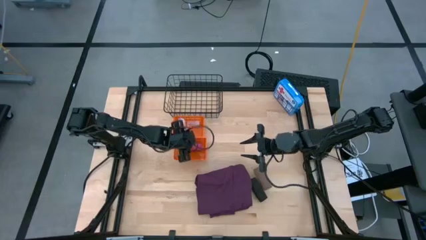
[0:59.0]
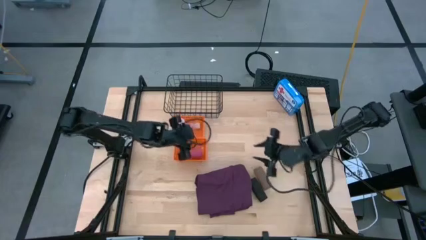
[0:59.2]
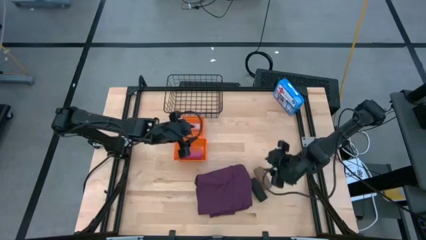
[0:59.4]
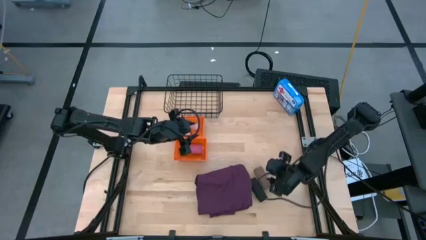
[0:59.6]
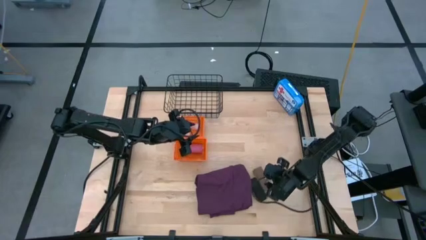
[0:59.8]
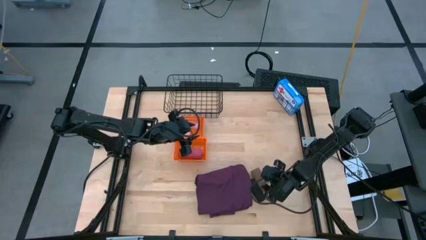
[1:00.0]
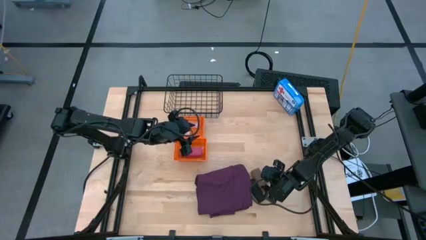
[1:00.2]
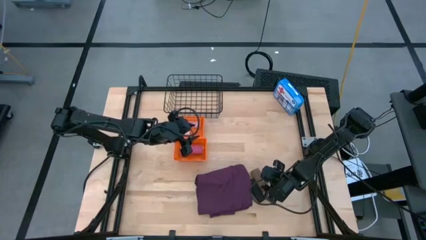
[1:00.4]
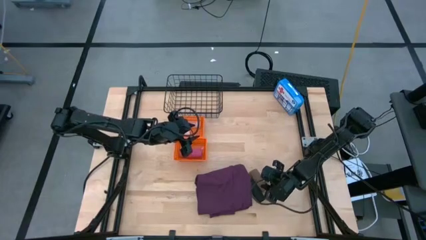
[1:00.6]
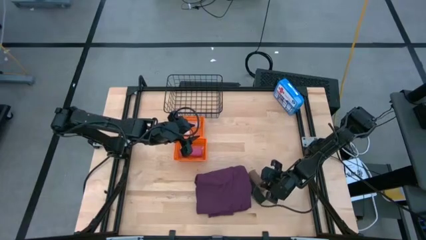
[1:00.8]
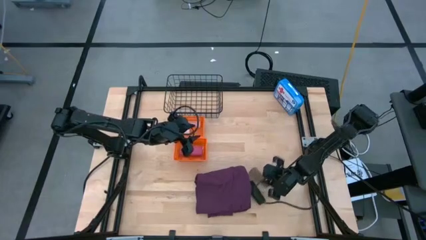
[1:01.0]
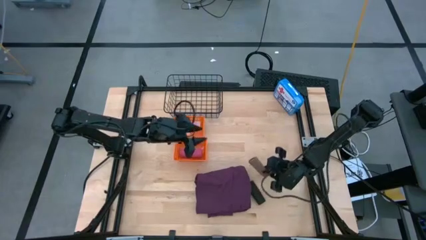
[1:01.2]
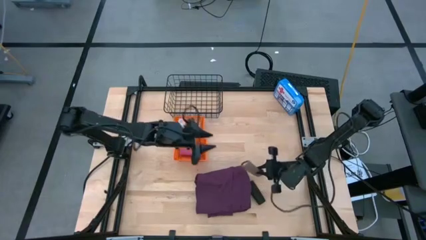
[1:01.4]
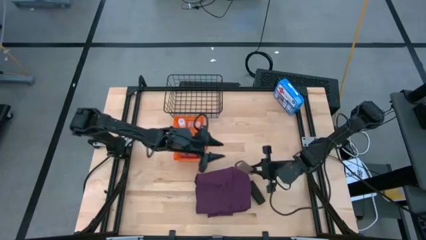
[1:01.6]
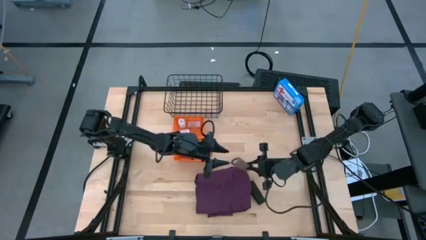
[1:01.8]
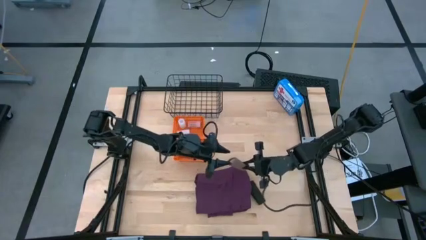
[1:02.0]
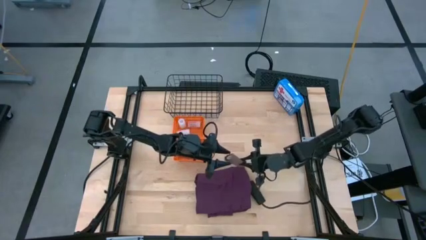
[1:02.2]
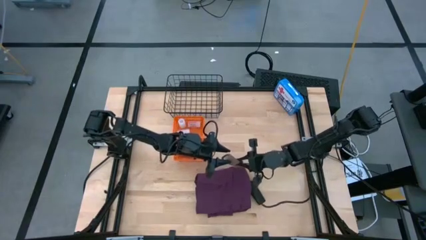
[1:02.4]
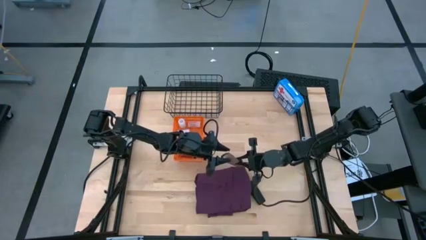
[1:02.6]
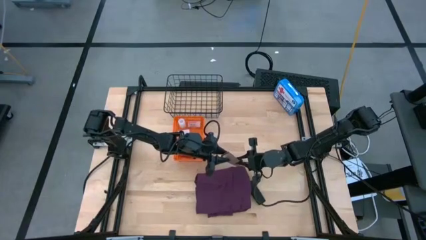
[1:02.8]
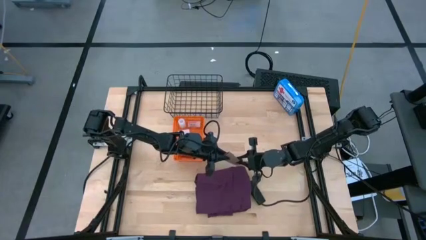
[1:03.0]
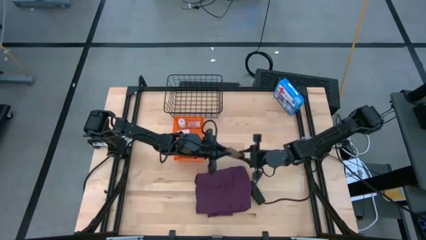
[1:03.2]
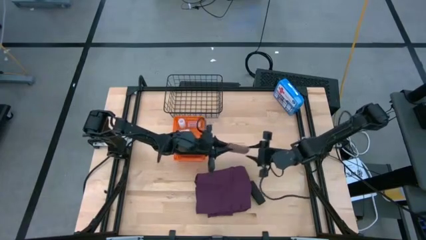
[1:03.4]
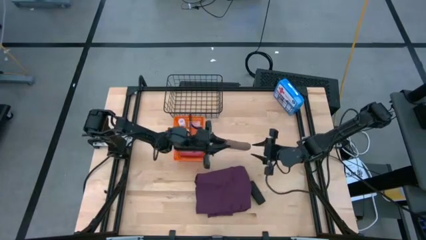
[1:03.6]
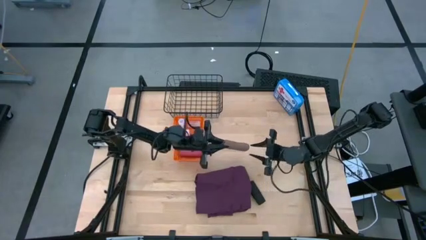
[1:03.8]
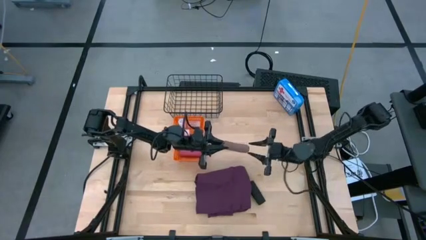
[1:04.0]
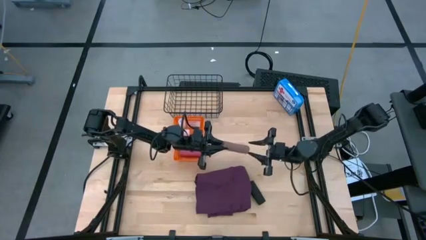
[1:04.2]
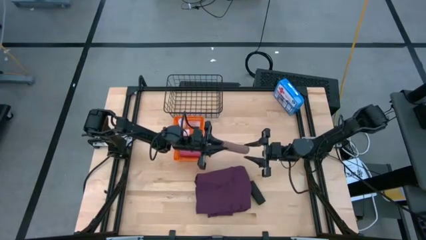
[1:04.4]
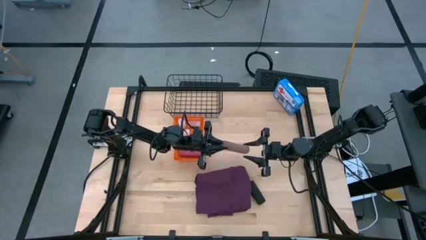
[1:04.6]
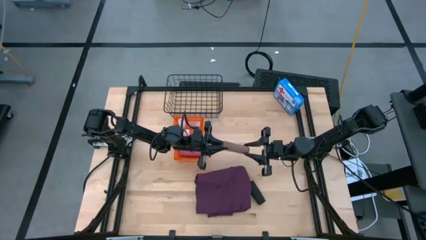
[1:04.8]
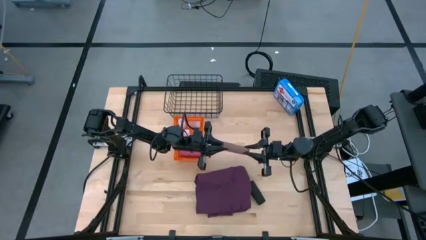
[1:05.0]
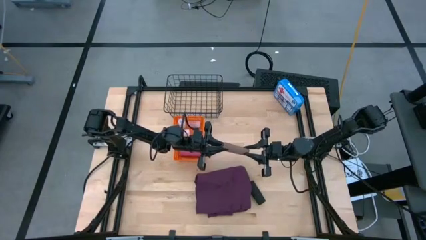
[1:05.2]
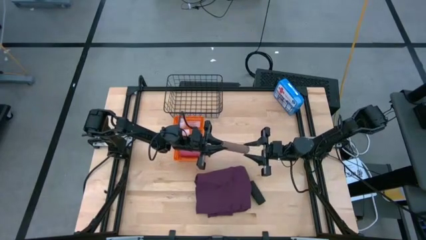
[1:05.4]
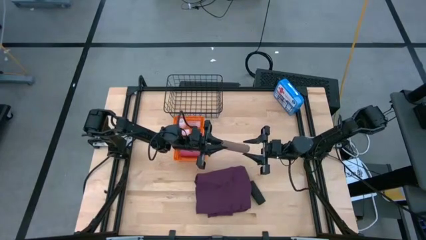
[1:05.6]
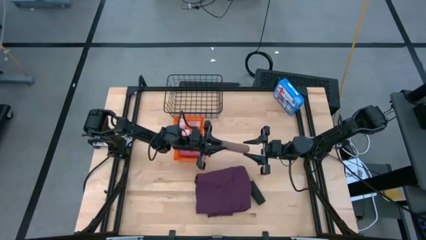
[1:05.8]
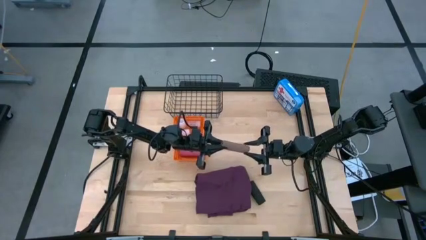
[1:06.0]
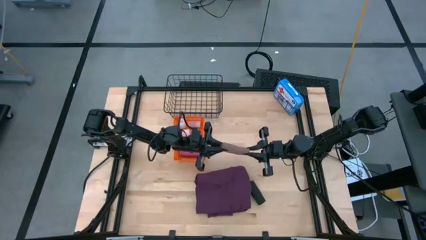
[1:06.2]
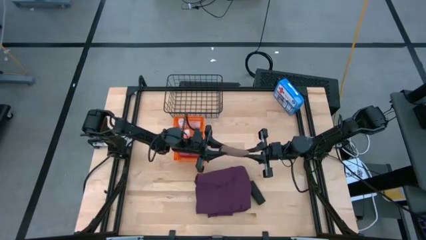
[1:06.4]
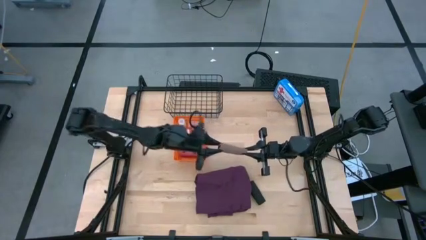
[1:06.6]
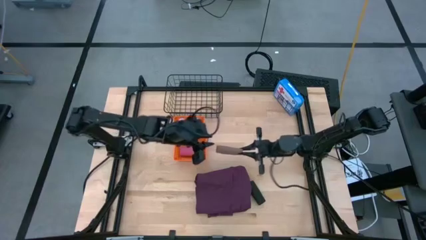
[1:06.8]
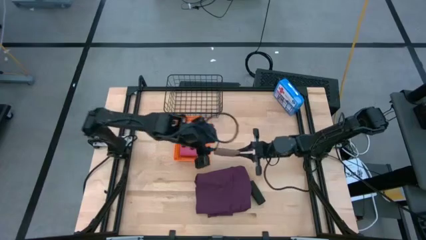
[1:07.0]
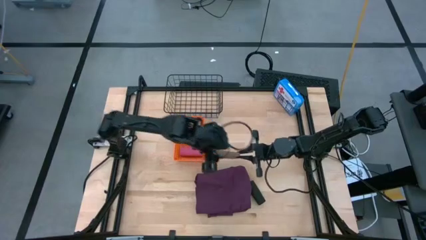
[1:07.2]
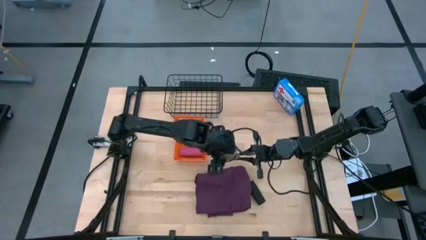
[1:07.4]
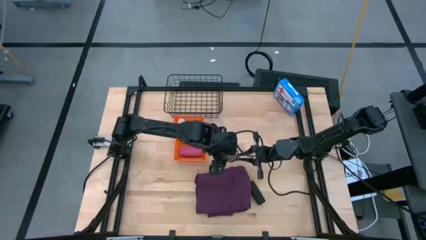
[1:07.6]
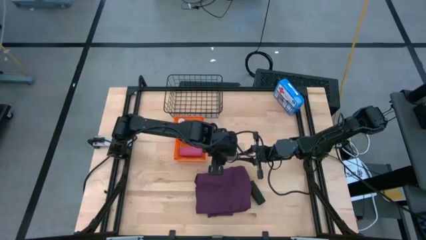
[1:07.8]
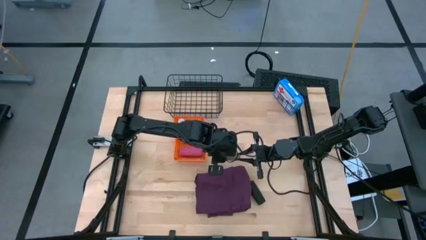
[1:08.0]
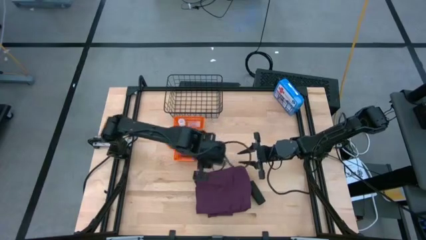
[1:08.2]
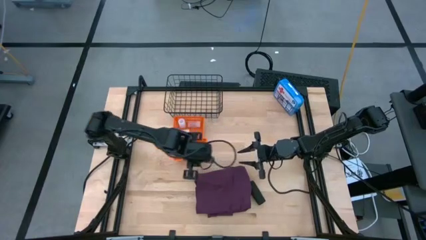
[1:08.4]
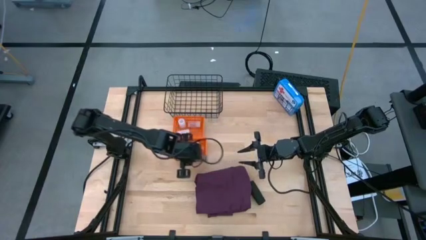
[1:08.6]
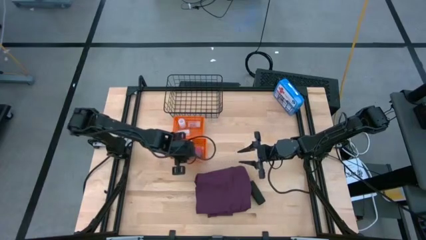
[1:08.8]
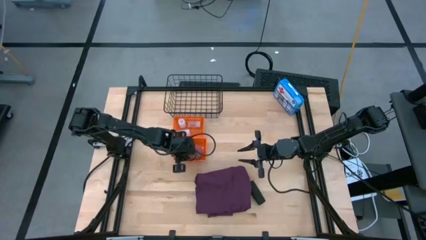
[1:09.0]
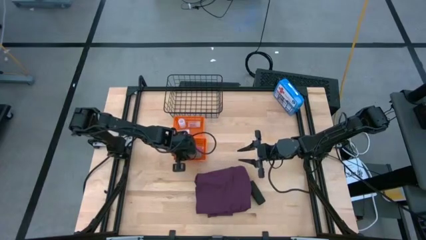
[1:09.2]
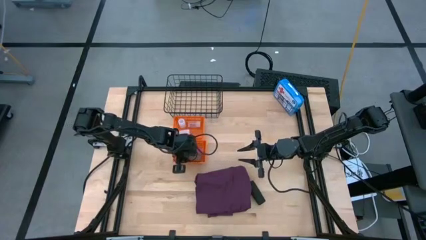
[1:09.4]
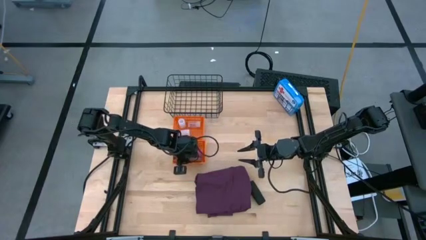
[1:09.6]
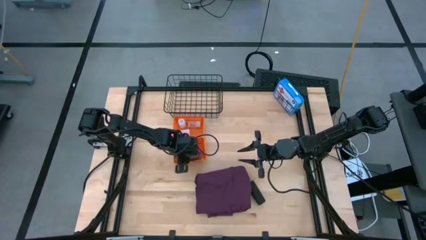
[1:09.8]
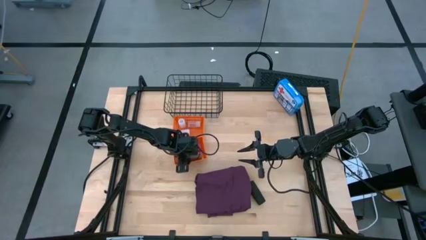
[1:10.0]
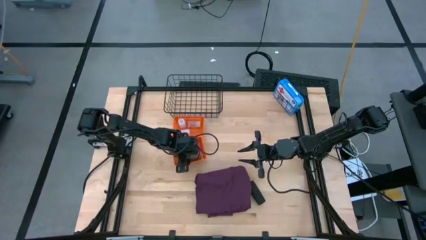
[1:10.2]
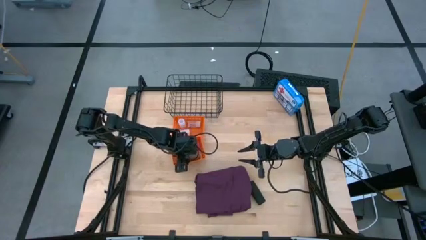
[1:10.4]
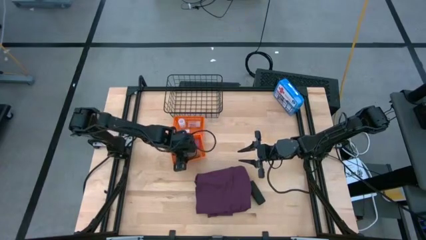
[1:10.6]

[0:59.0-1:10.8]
Task: Pick & place medical supplies in basket/bin
Put the brown bandage into the bottom orange bin

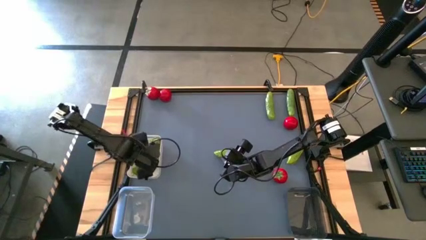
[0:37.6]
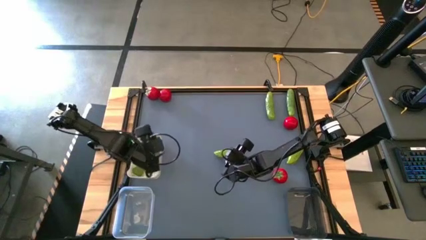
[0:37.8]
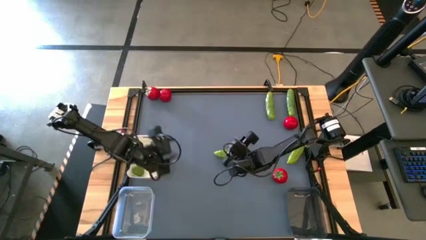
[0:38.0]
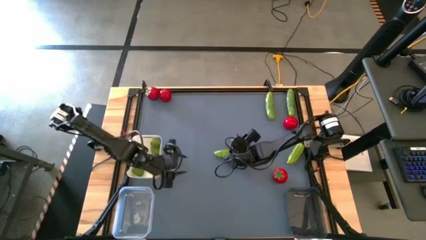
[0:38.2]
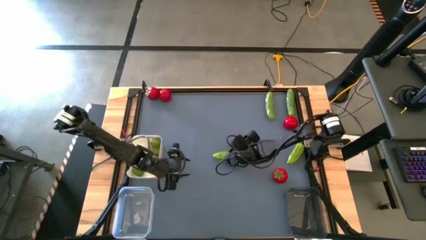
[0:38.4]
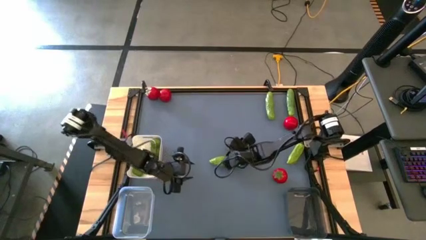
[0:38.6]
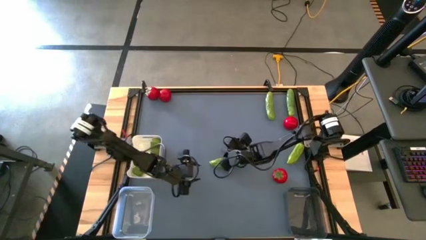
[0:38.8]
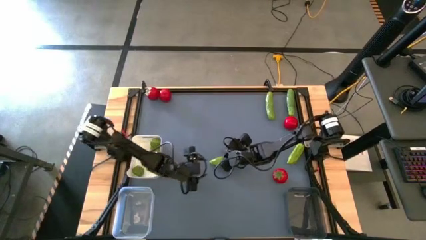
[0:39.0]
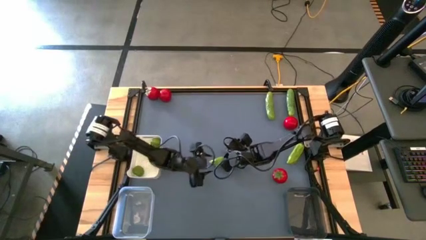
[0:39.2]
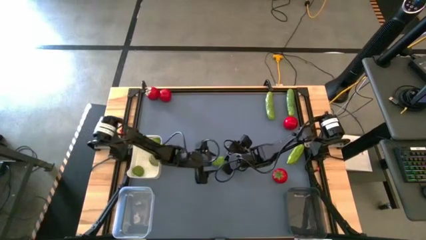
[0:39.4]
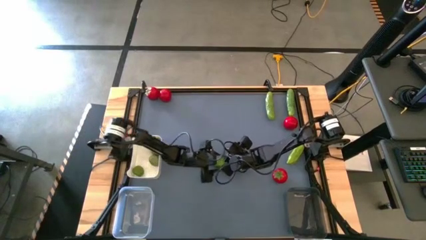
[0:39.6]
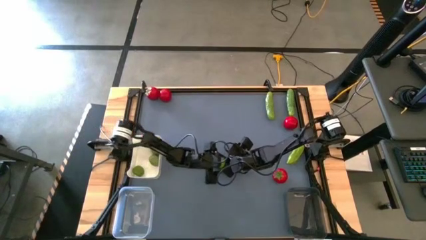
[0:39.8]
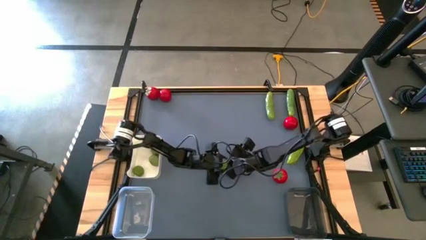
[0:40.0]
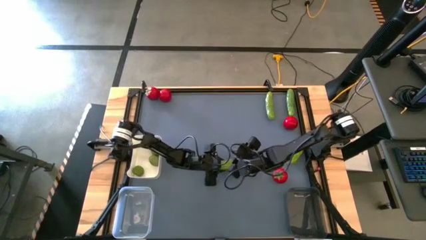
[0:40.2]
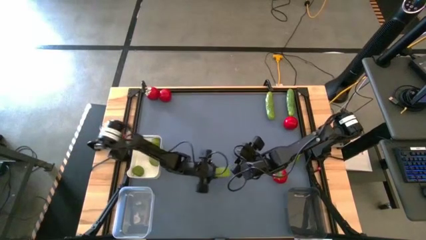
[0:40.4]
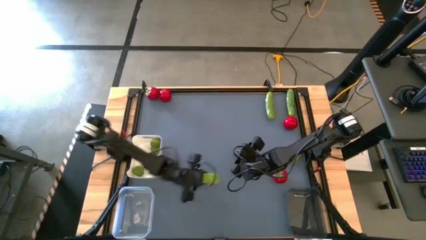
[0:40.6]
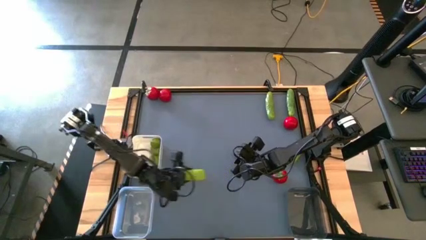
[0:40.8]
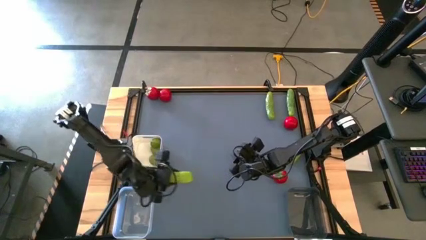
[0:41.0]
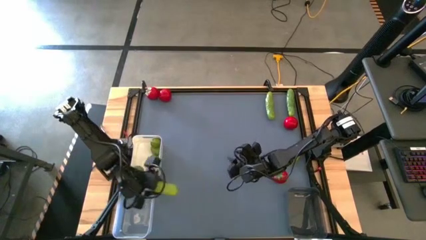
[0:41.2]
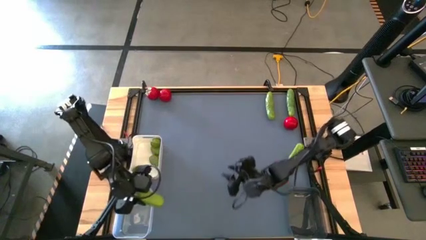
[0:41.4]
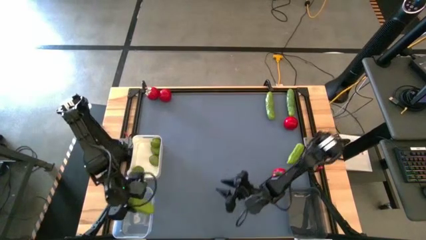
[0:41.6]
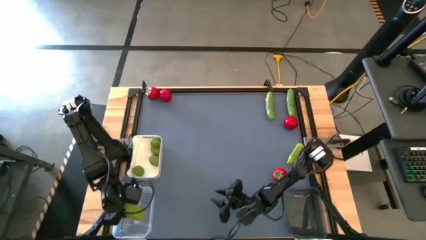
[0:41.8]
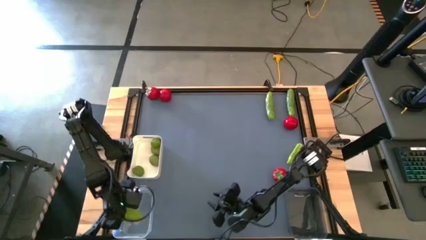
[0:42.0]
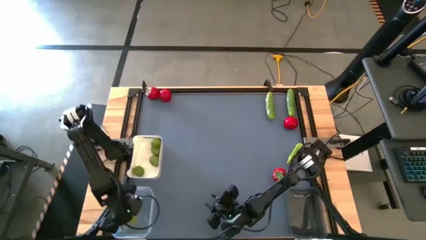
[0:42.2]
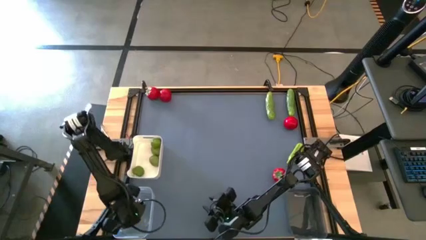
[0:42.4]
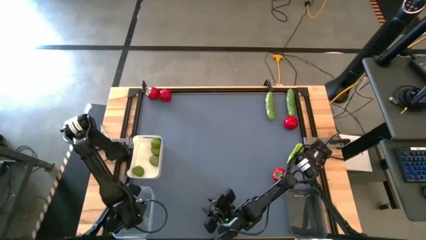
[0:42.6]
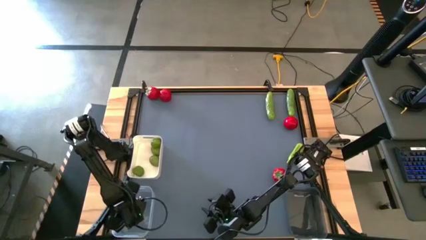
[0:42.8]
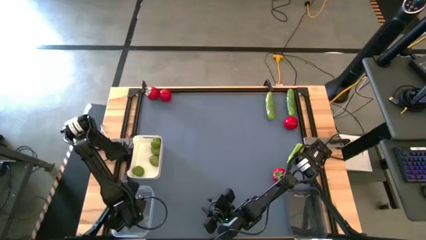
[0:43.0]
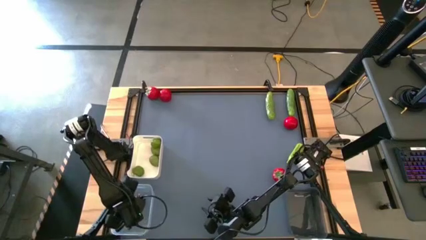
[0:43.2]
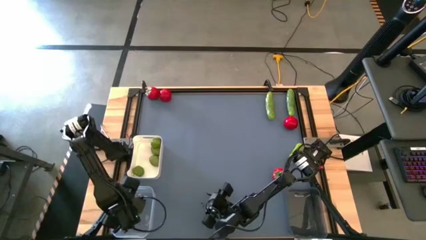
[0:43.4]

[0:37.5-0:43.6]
Task: Sort produce into baskets
Put the green cucumber into the transparent bin
